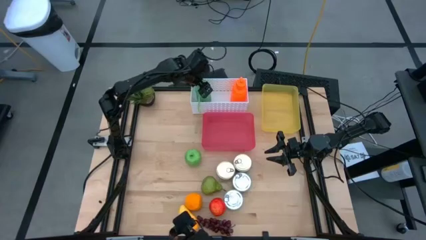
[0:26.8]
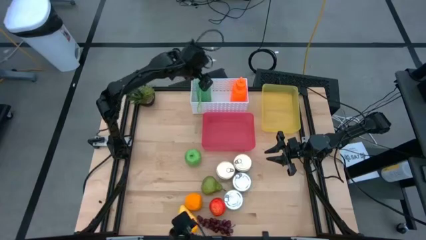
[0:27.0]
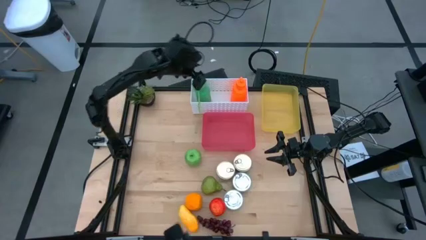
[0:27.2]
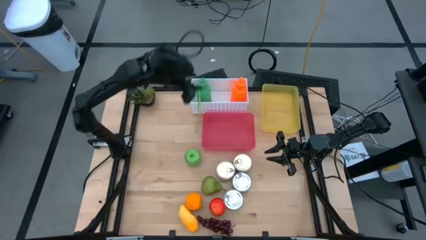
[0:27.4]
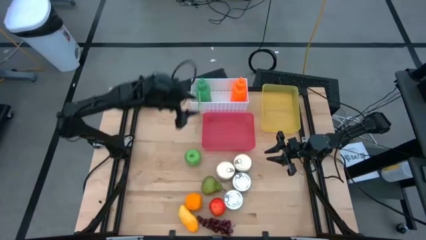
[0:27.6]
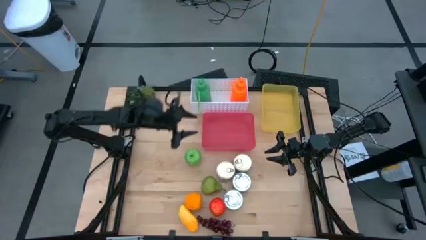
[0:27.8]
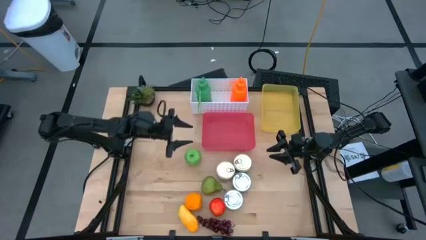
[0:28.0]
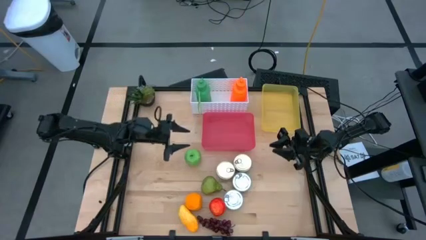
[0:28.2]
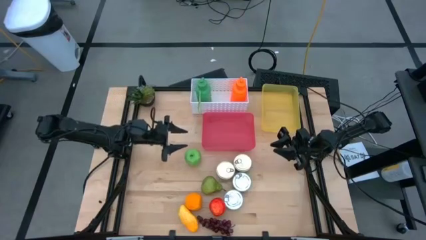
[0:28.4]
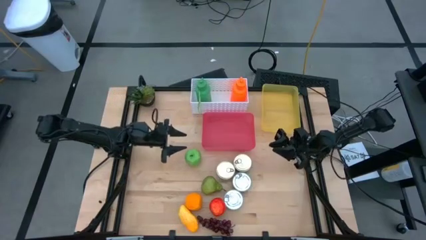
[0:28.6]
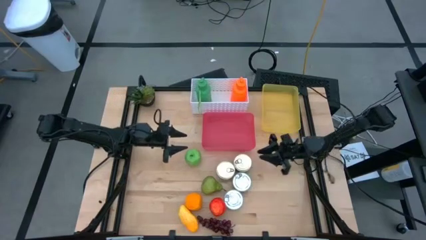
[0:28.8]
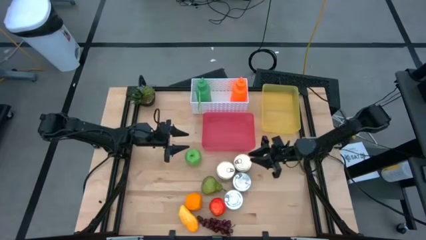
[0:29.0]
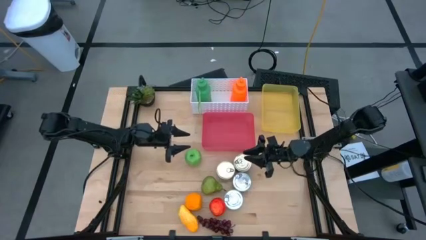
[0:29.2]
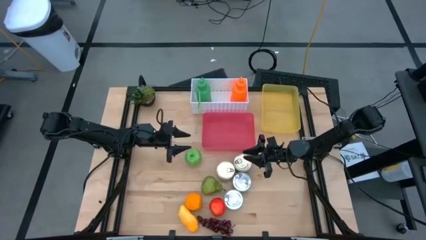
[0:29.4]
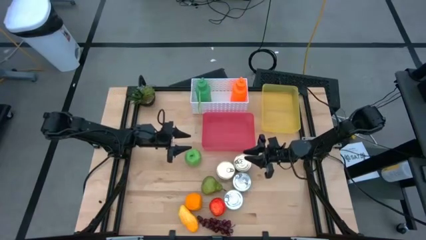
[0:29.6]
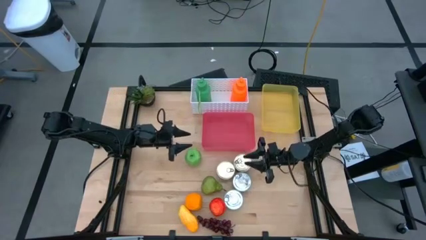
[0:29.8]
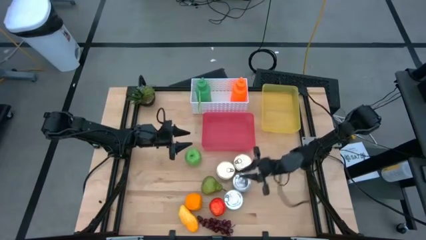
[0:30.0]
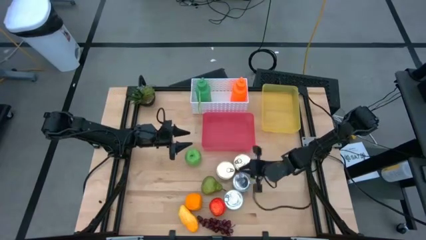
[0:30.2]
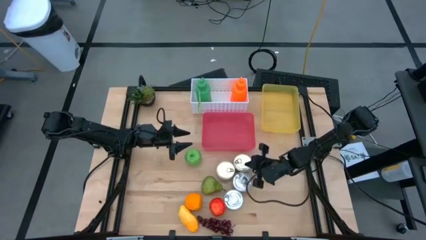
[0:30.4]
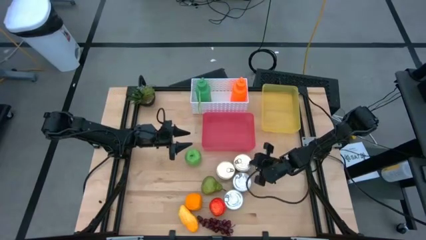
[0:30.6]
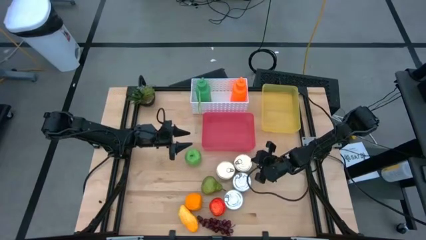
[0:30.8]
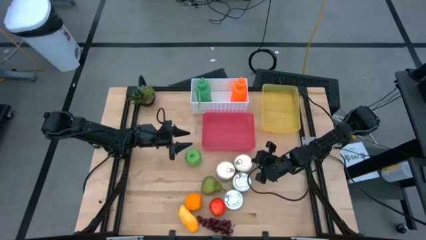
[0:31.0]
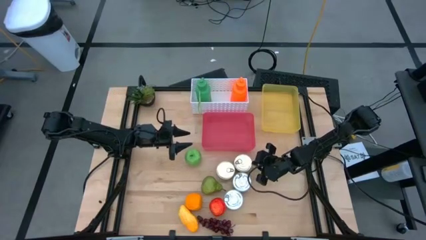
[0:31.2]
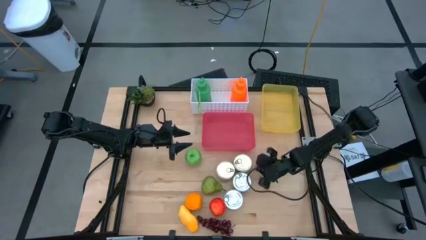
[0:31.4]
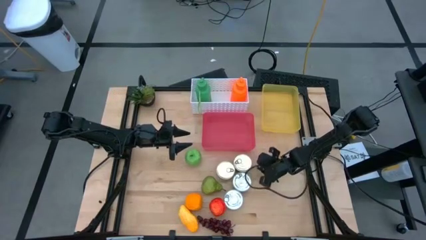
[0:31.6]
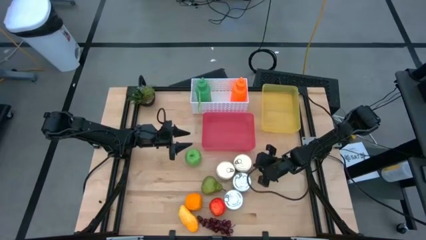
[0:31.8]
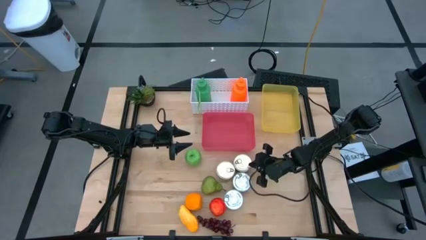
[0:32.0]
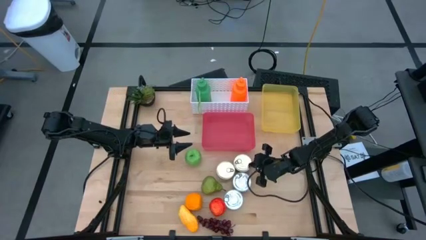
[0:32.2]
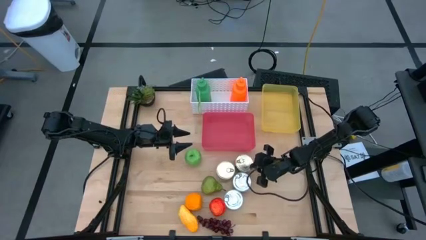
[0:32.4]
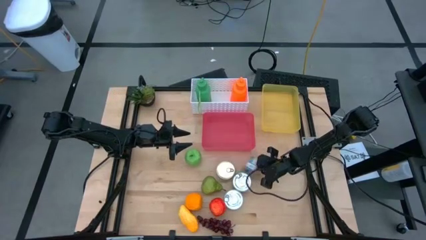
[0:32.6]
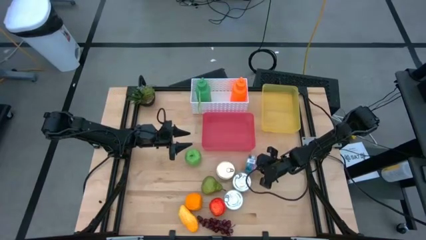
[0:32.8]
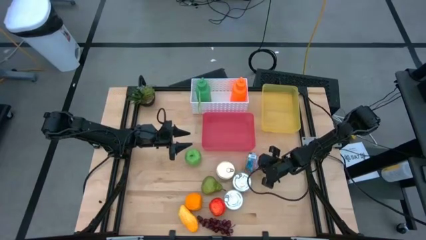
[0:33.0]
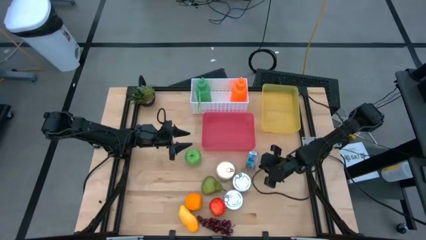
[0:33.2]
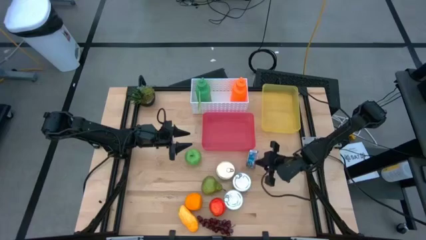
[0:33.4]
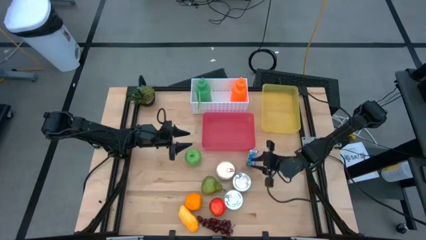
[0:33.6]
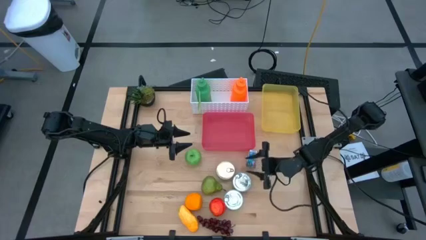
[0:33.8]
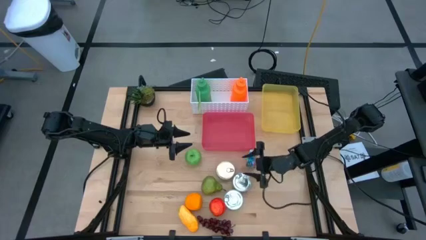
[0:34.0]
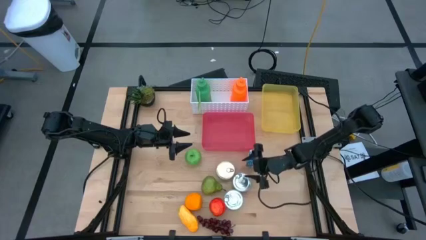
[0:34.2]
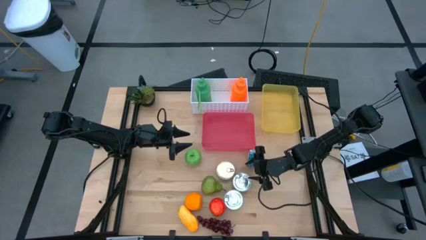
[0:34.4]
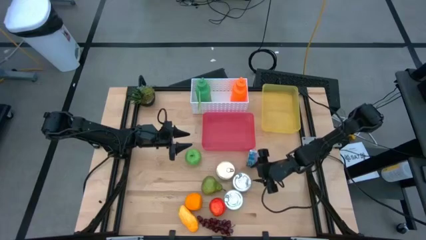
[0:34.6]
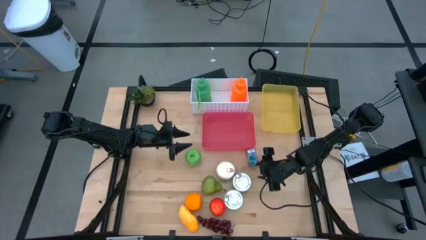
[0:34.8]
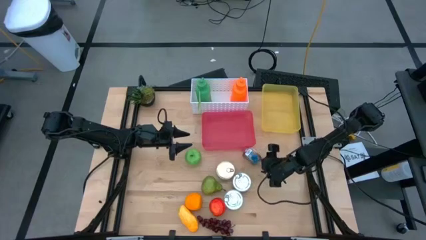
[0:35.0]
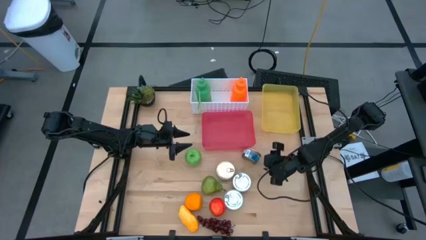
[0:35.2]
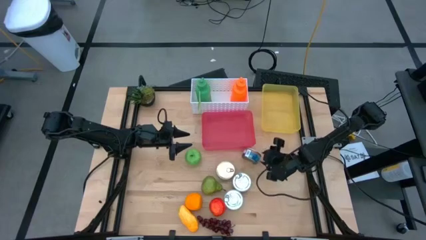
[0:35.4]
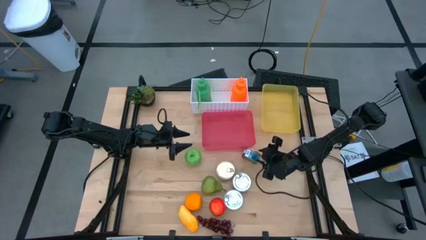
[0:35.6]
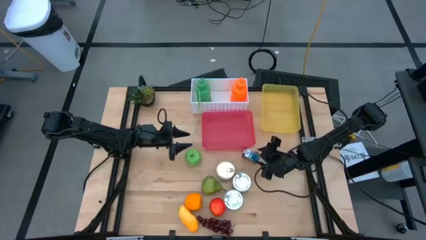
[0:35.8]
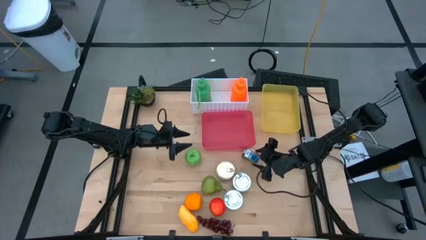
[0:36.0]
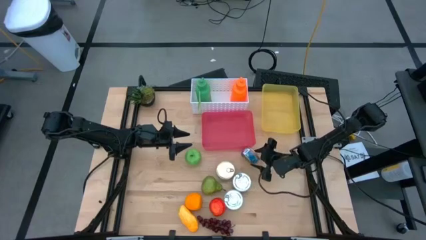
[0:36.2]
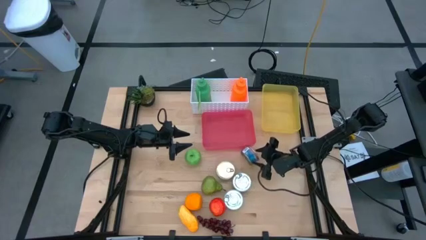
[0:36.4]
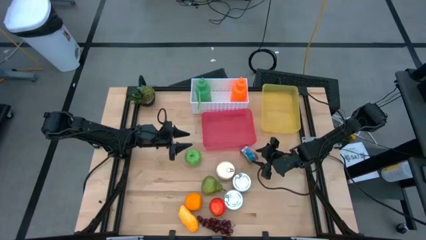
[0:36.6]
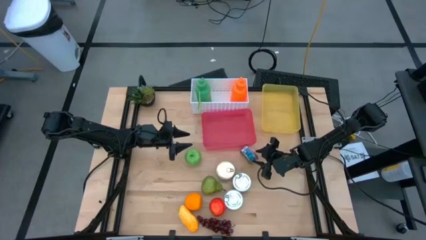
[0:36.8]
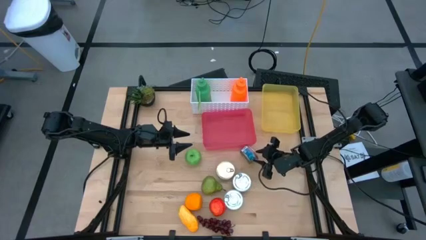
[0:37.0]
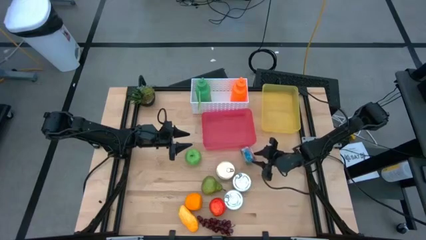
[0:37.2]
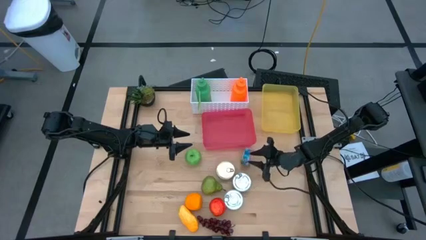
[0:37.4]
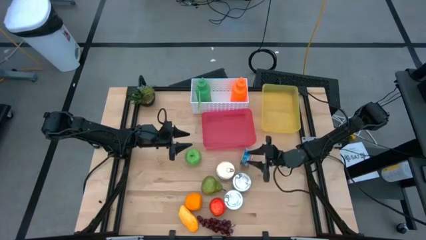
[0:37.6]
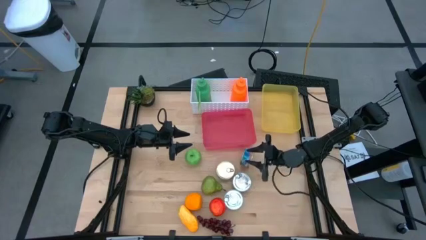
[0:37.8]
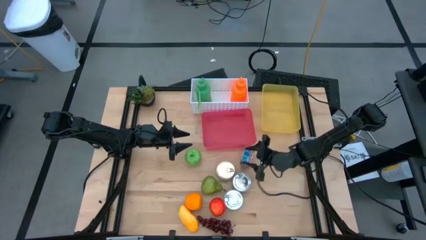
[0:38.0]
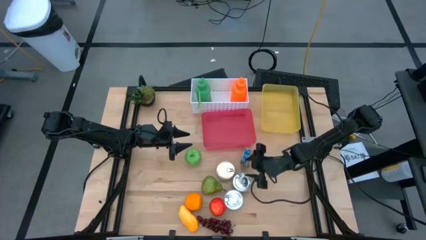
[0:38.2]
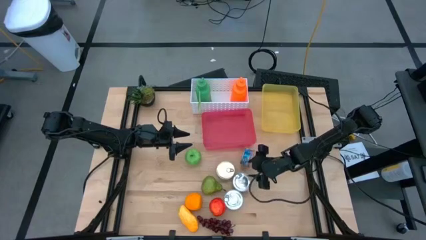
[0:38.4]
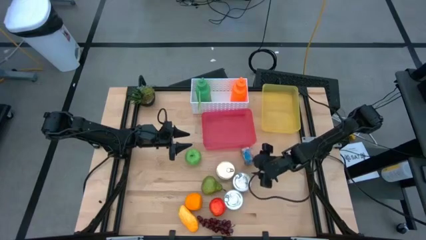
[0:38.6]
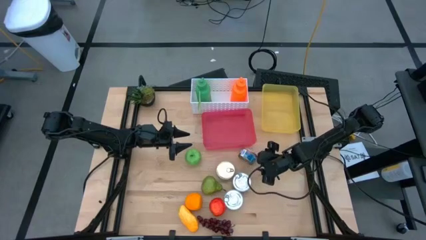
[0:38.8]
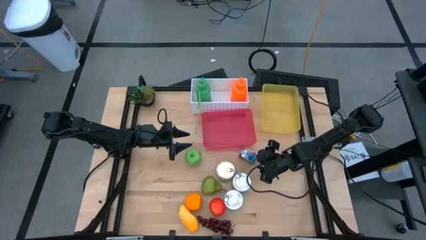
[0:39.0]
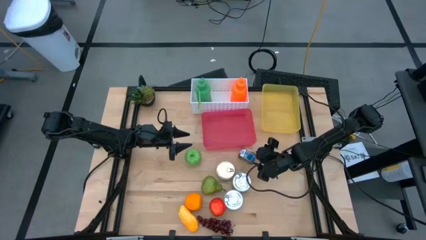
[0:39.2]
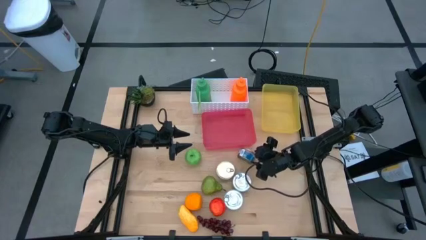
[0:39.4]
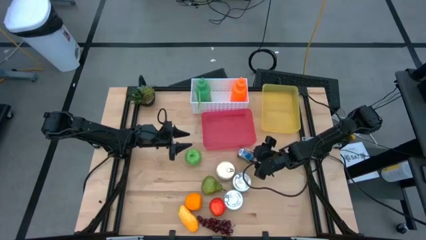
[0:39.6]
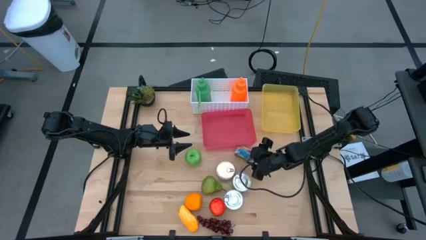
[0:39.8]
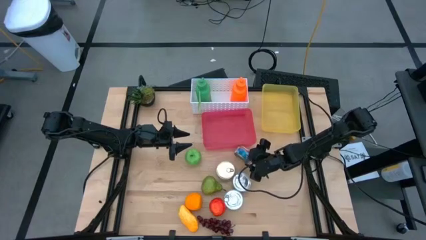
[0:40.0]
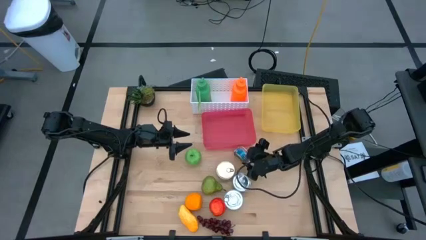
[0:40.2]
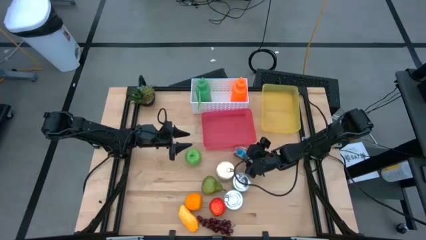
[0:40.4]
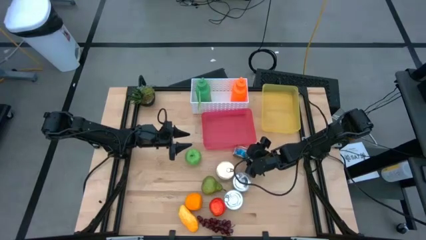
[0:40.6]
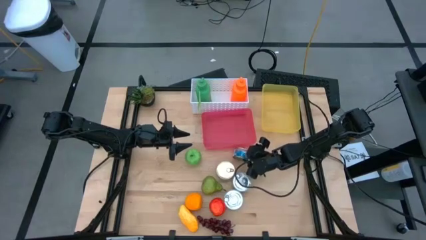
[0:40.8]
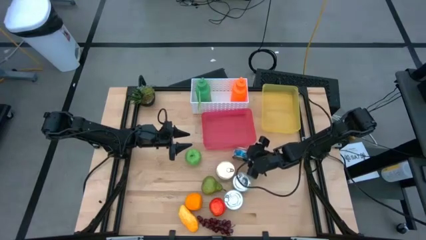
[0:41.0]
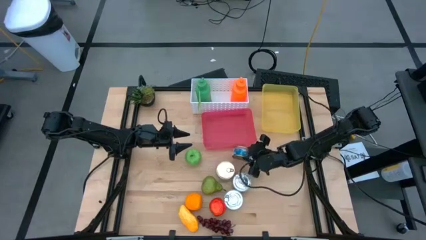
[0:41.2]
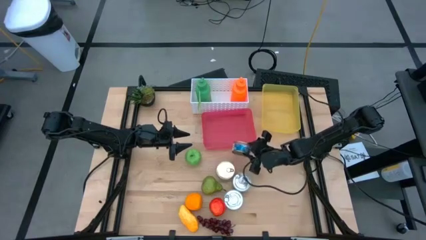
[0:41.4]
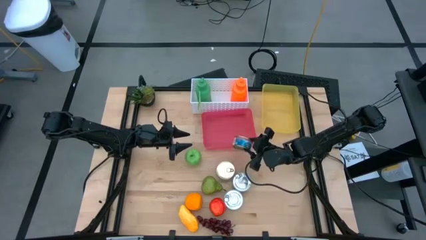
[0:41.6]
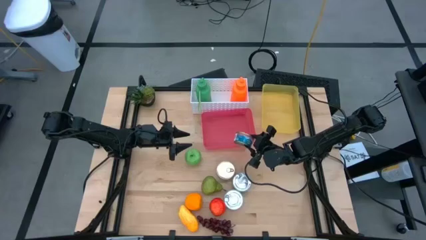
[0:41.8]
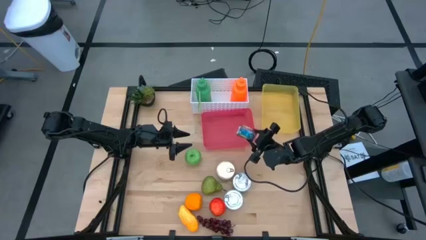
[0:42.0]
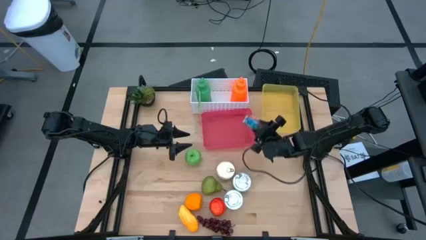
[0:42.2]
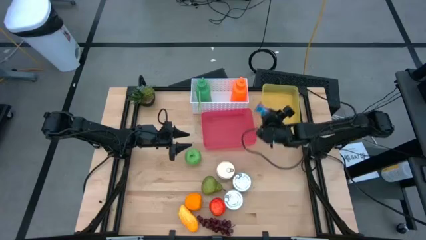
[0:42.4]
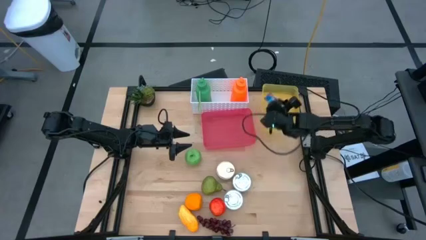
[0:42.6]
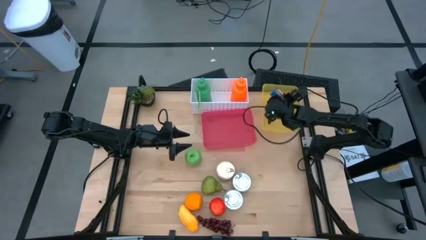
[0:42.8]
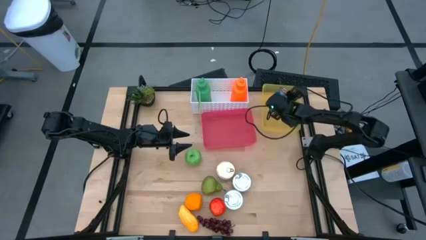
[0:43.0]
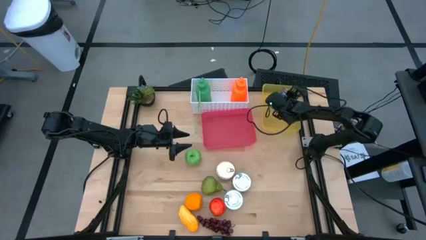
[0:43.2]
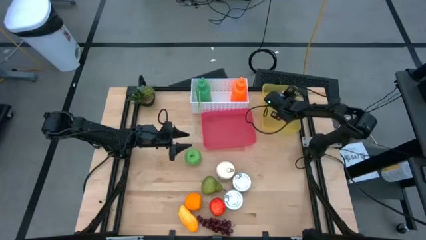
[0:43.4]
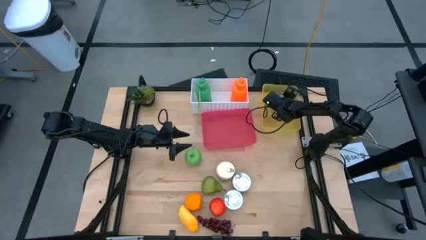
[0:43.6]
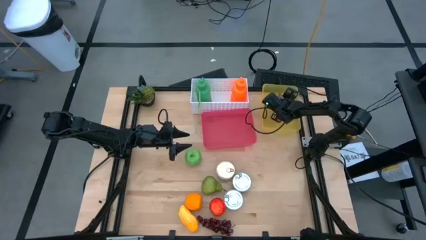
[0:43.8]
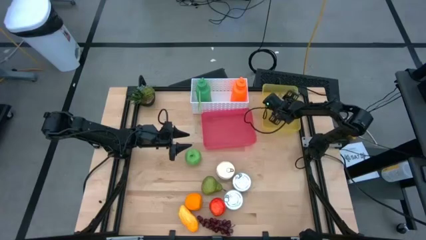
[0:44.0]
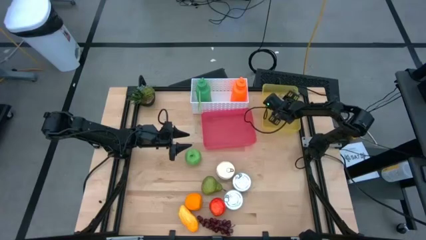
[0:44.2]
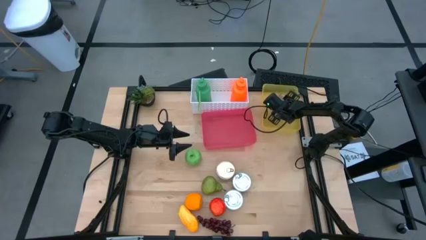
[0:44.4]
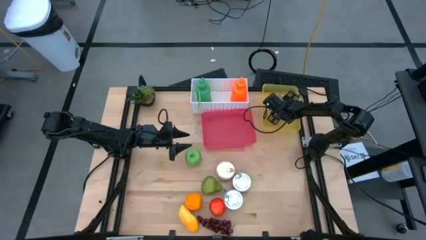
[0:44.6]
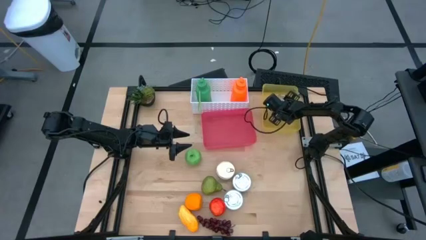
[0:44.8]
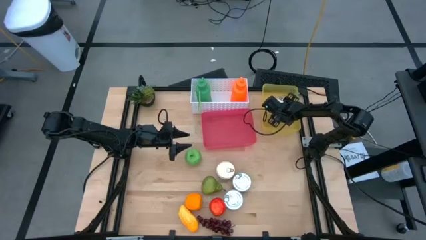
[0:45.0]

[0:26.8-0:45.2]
Task: Pick & Place Food Item
Put the right blue and pink tuna can into the yellow bin
